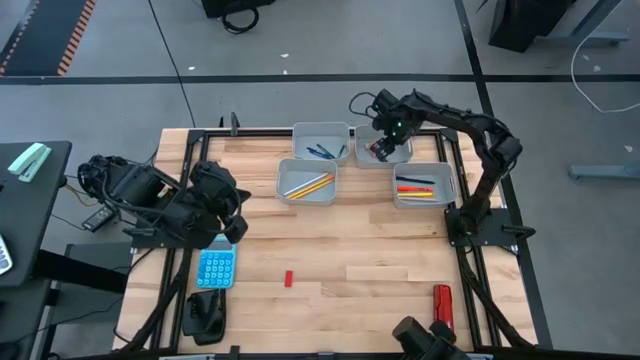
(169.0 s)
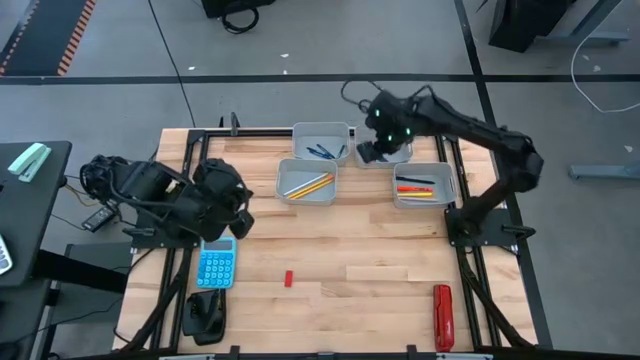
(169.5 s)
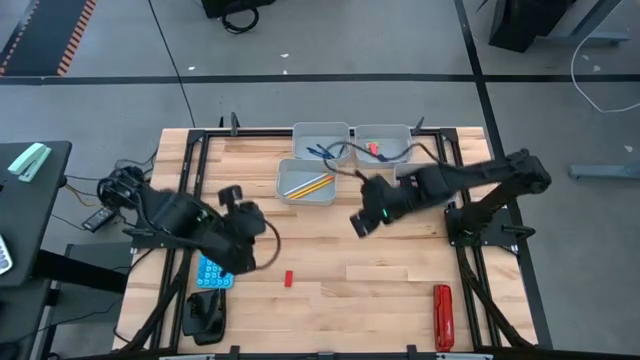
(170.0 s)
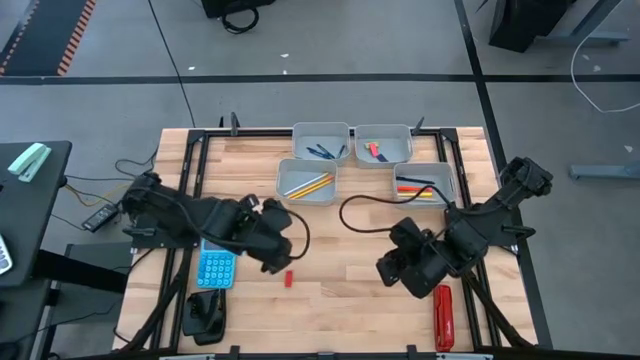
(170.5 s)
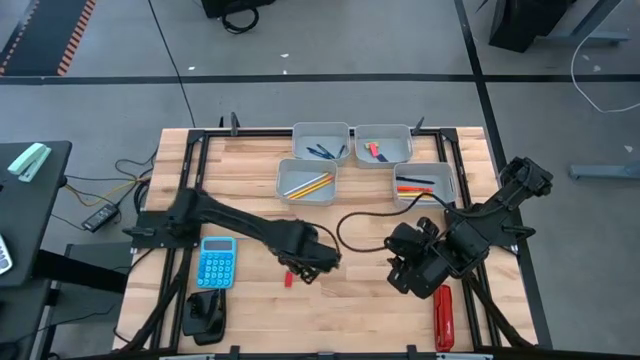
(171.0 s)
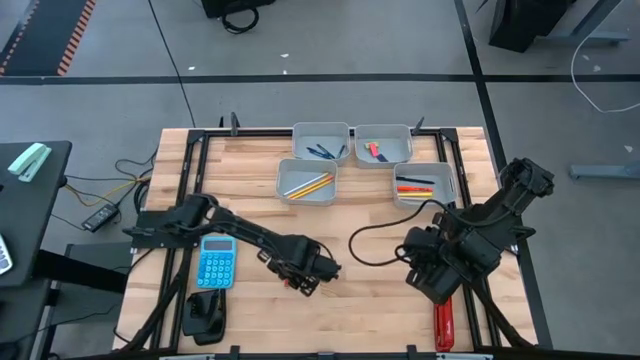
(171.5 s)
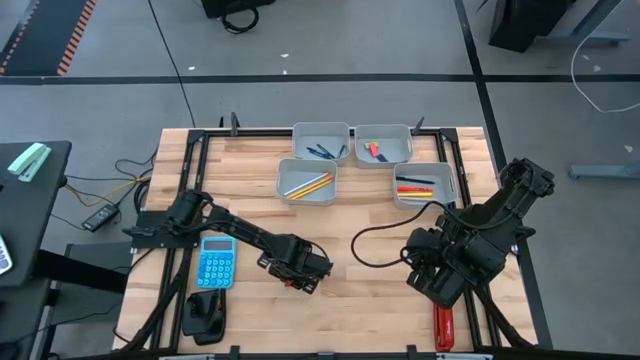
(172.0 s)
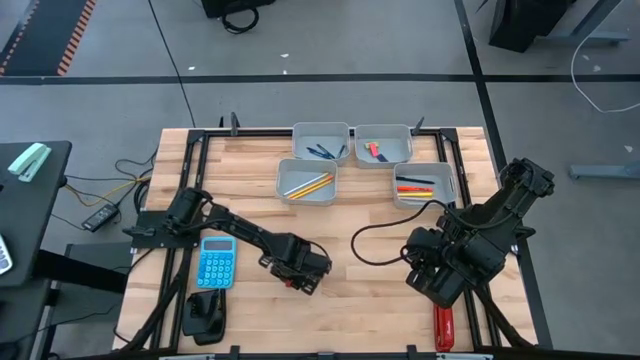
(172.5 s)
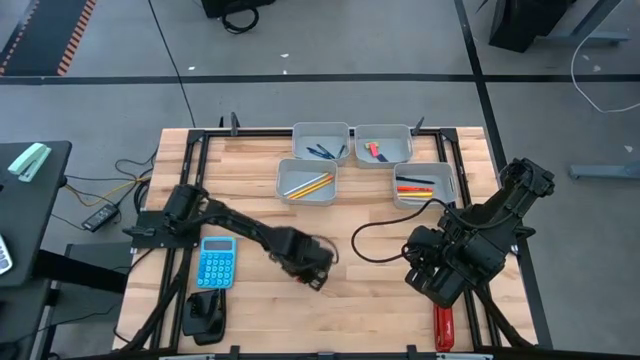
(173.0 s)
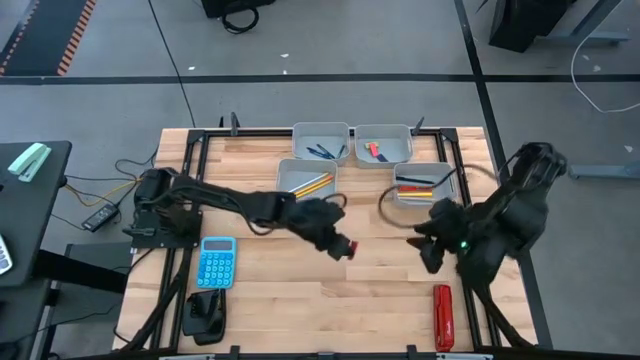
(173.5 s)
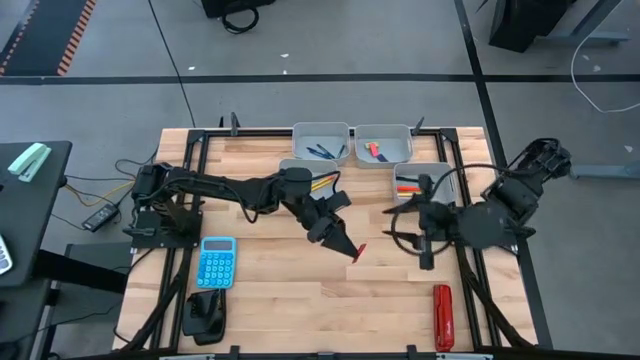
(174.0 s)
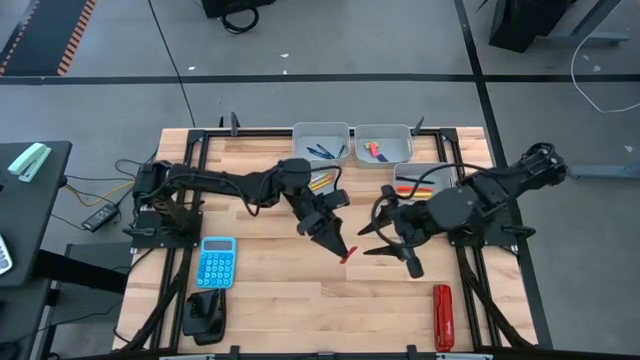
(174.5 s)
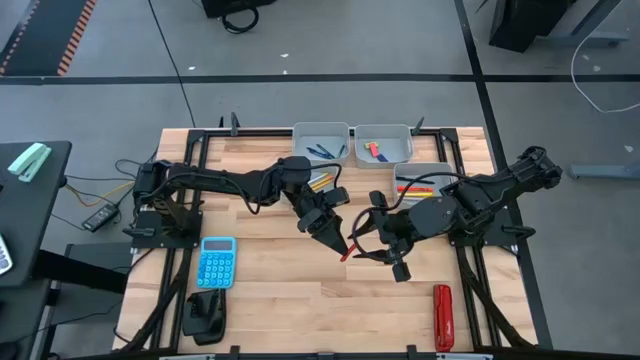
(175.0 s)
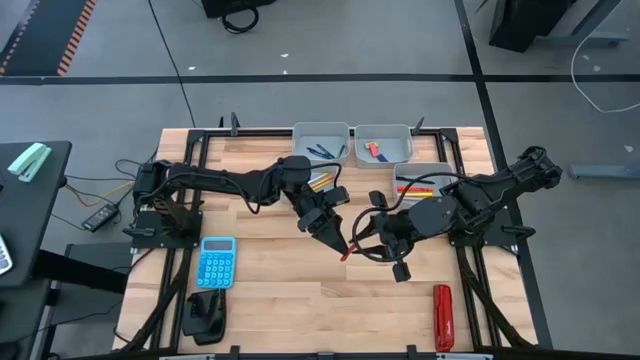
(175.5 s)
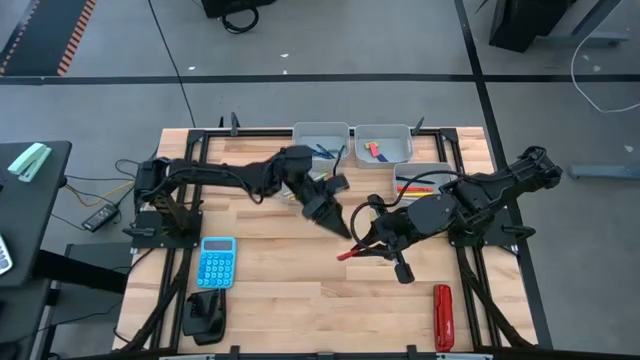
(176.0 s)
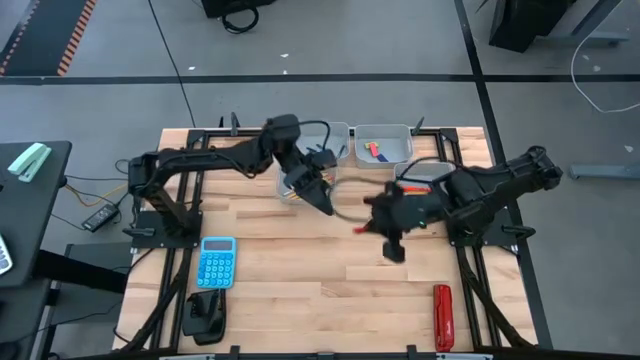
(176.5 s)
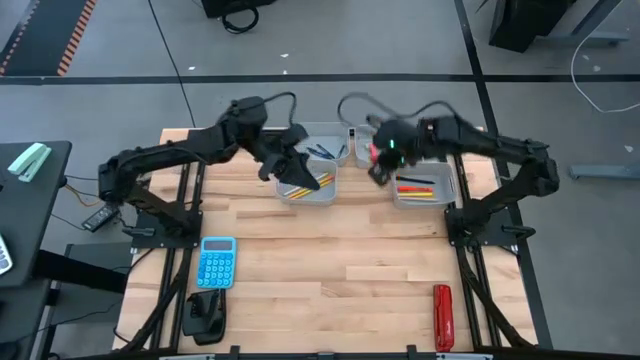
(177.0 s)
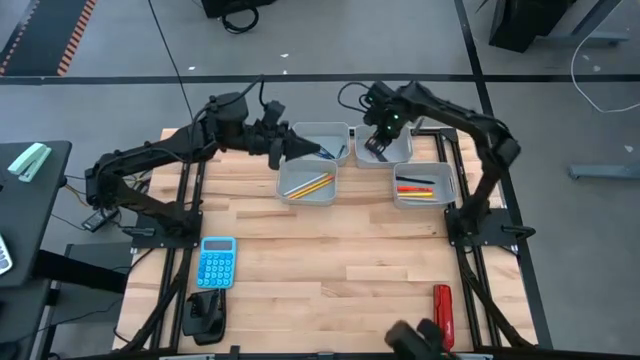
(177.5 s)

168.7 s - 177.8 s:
Task: Sort crayons/erasers/pens/pencils in bins
Put the red eraser into the top right gray bin

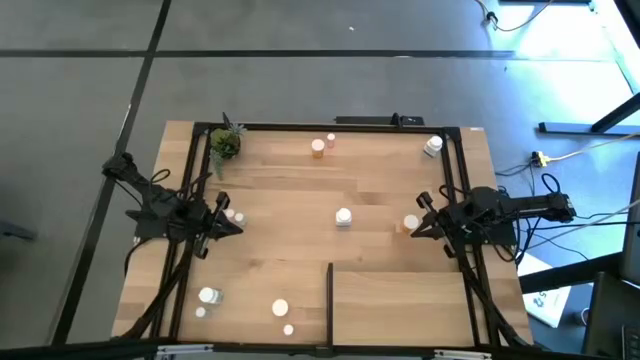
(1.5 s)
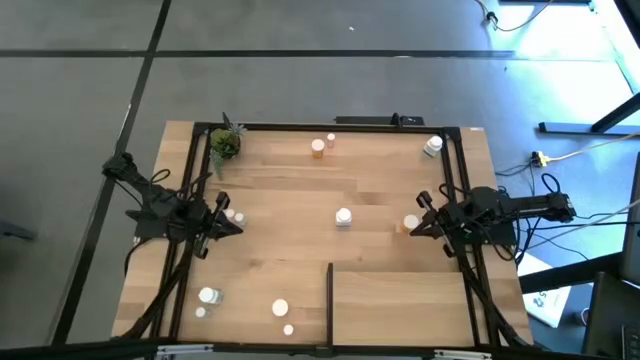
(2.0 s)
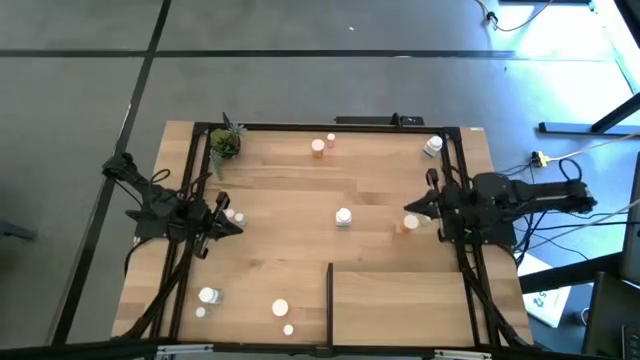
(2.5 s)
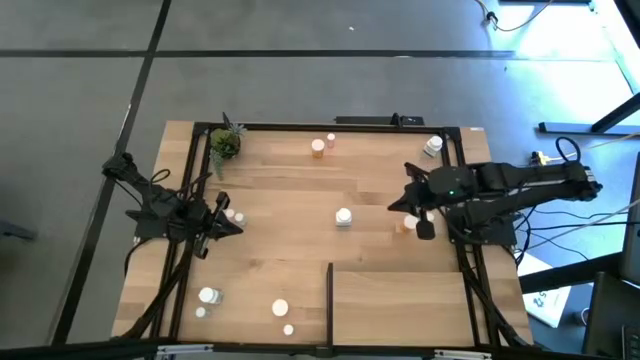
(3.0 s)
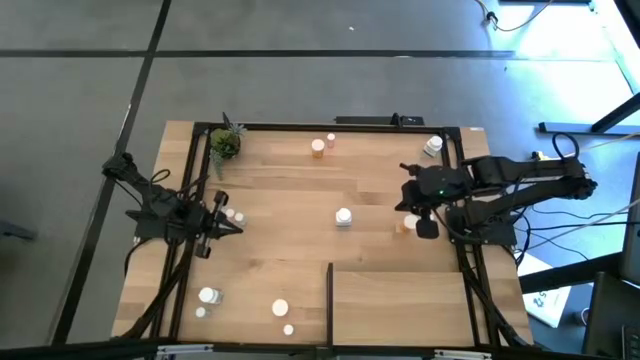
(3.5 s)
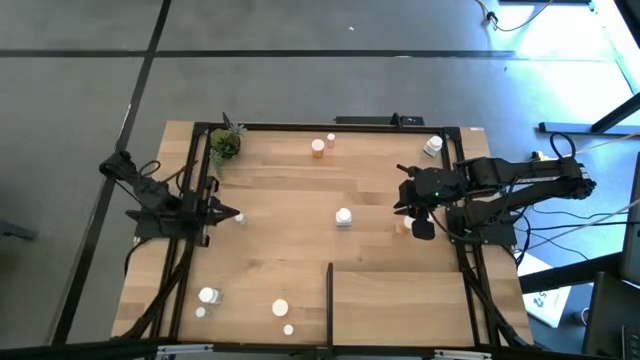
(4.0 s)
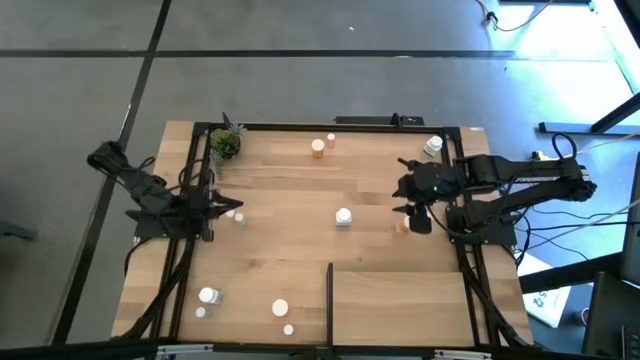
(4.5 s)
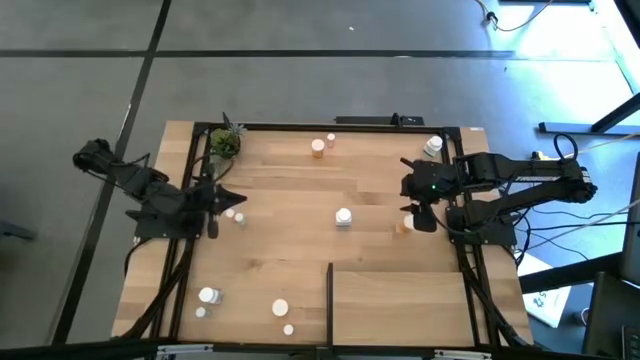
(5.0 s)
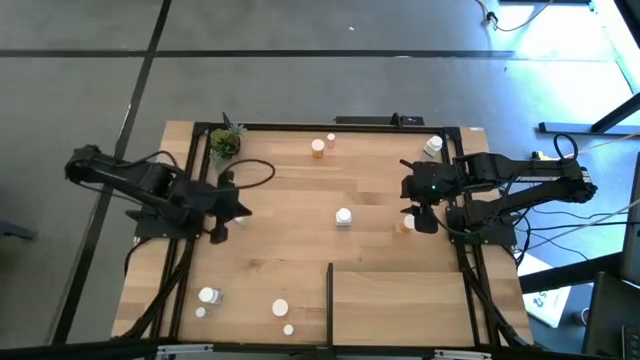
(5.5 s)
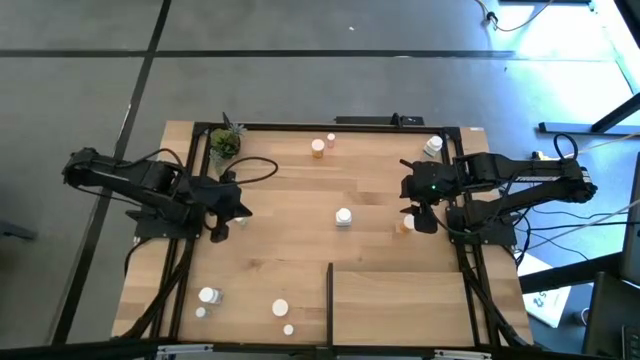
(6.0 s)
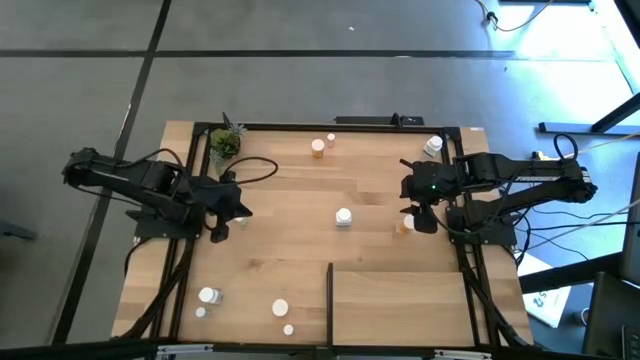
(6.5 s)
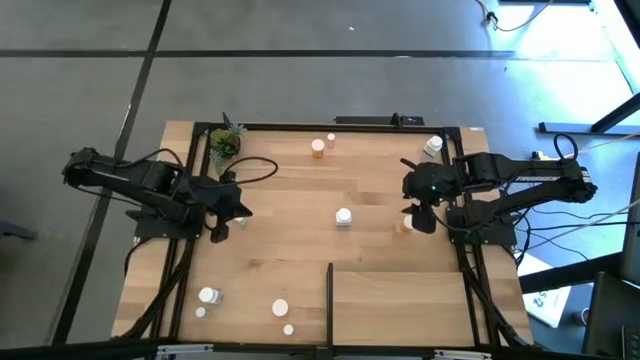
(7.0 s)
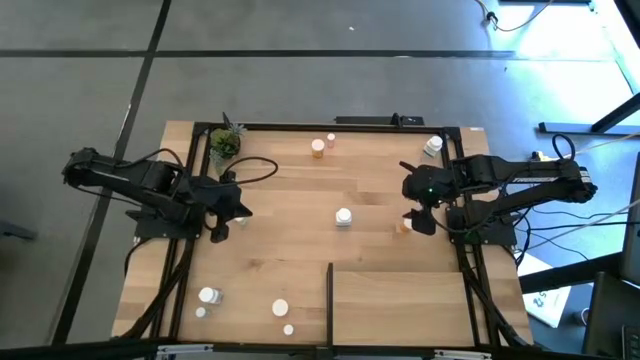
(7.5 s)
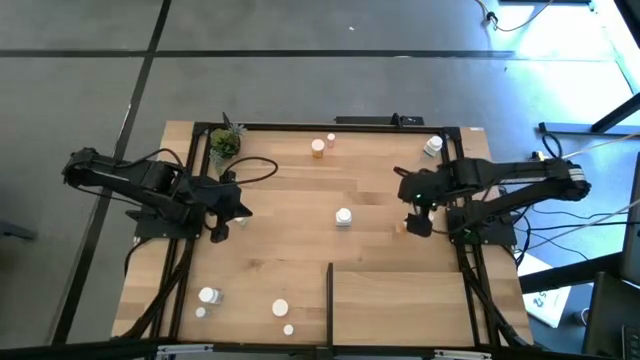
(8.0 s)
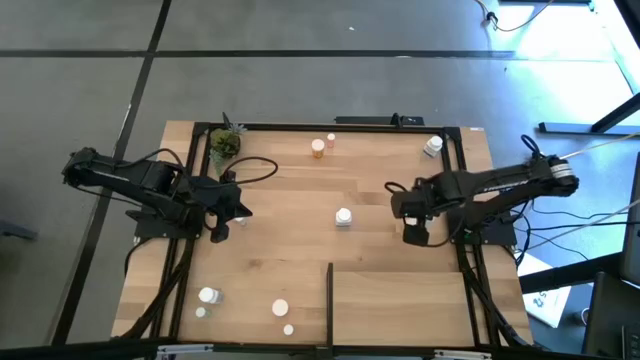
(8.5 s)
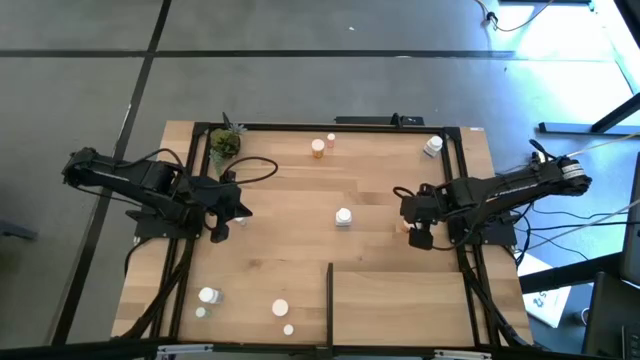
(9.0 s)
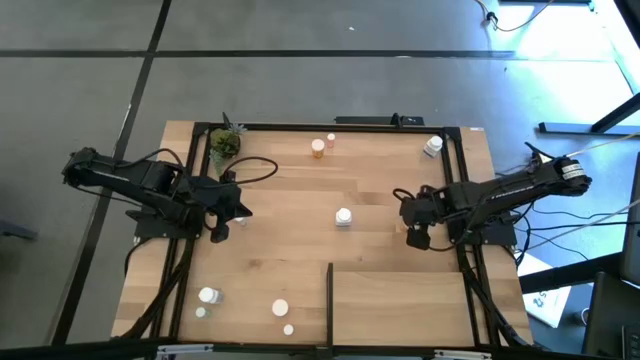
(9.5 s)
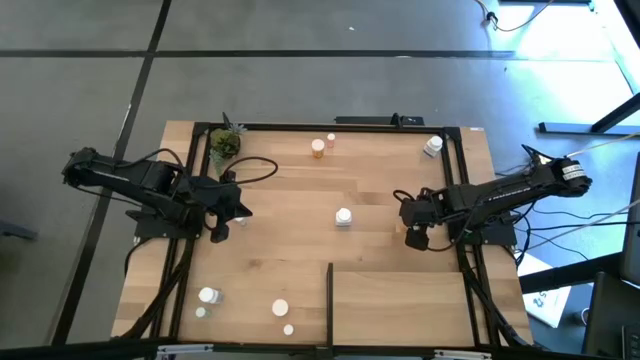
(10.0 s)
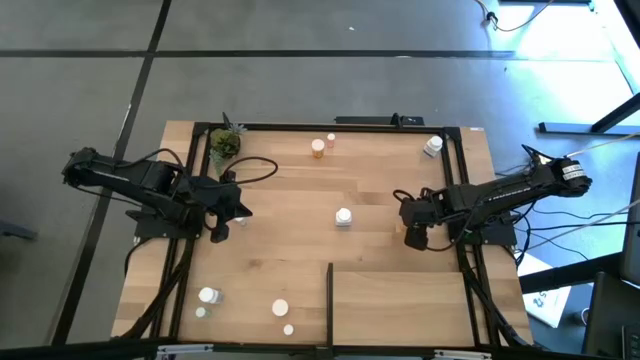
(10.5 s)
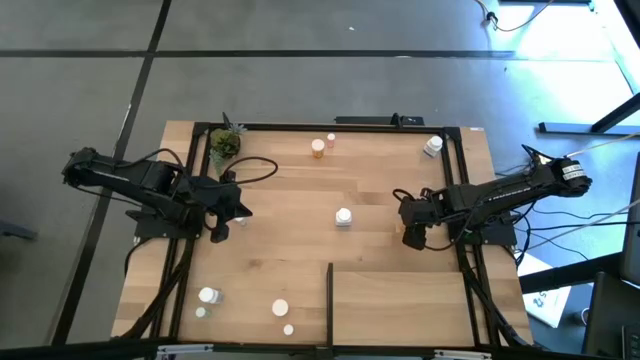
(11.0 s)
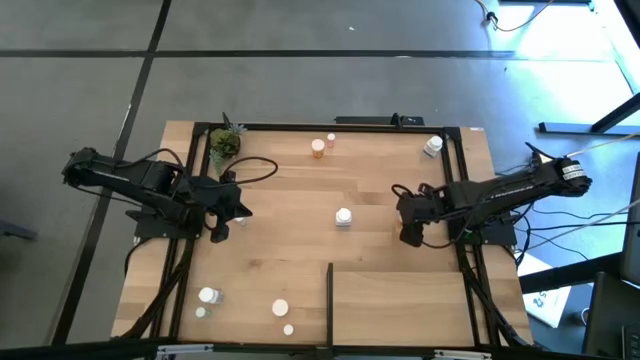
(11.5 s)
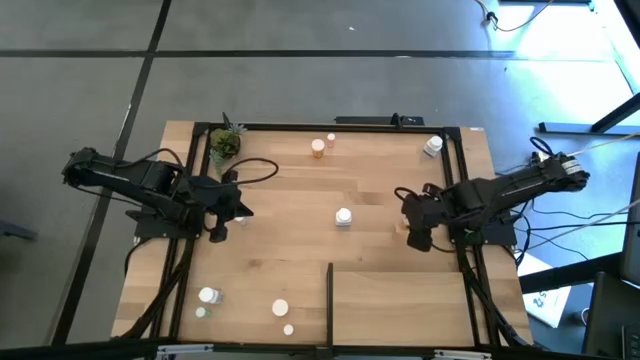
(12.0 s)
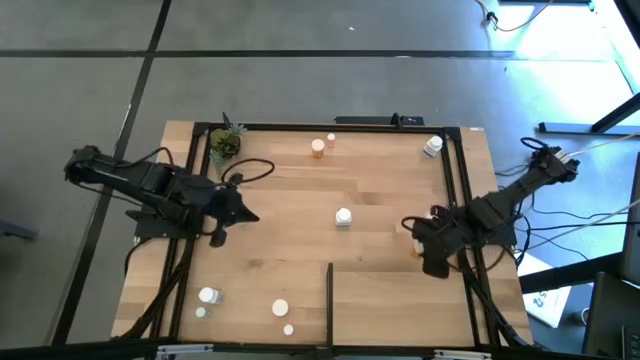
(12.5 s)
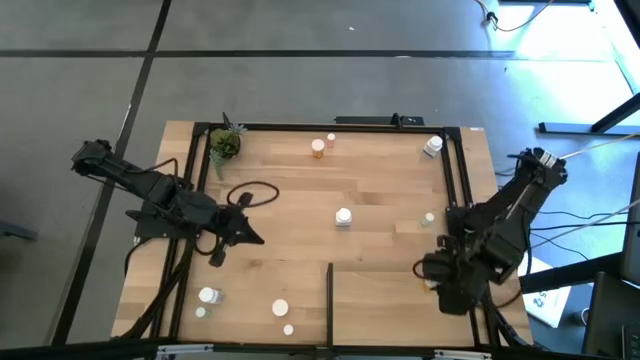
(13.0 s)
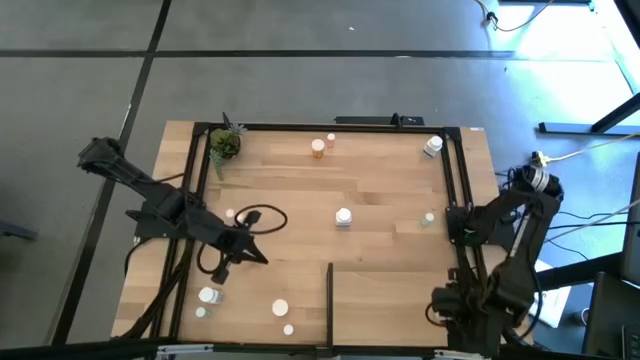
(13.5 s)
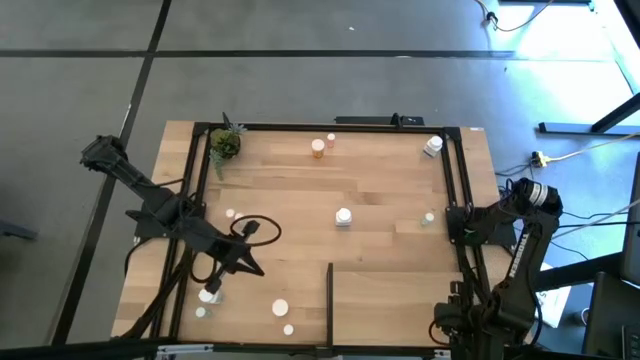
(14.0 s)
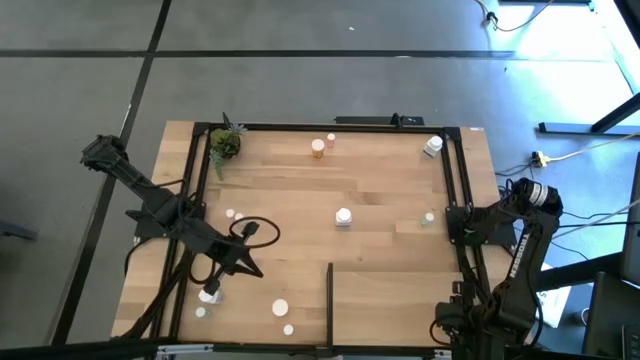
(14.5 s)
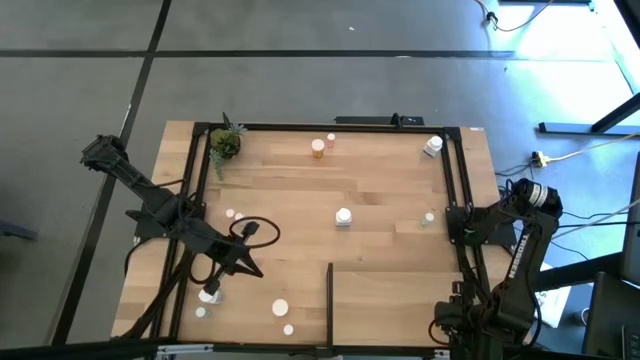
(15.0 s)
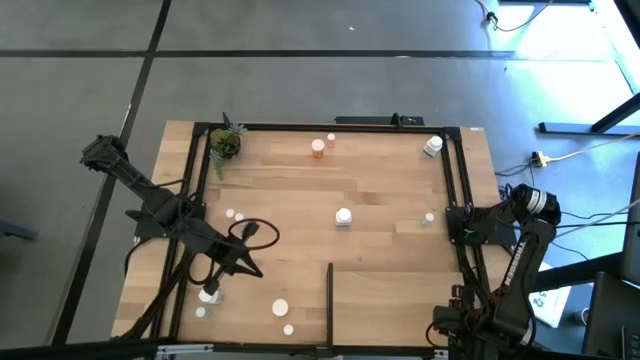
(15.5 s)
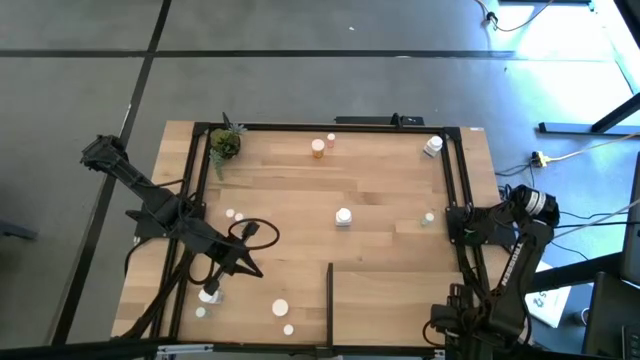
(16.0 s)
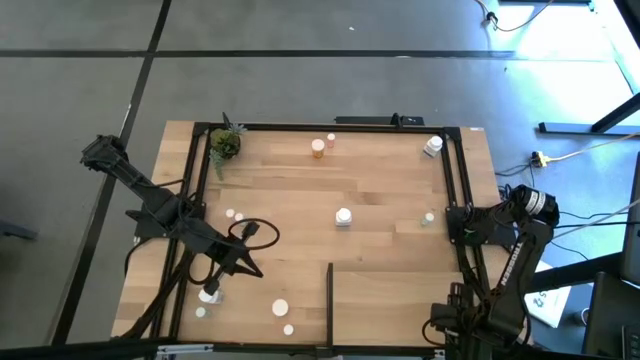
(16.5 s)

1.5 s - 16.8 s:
Task: Pick and place medicine bottles onto shelf by color
Put the middle orange pill bottle on the shelf
